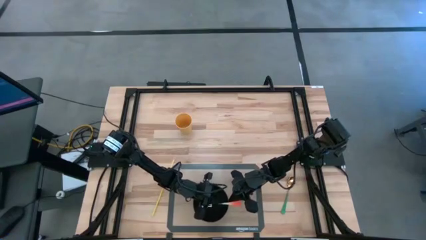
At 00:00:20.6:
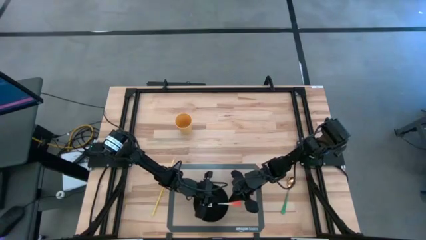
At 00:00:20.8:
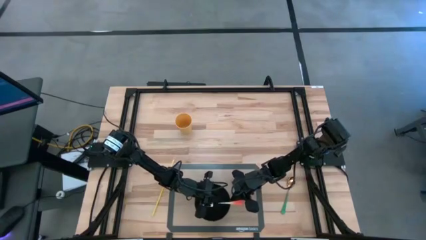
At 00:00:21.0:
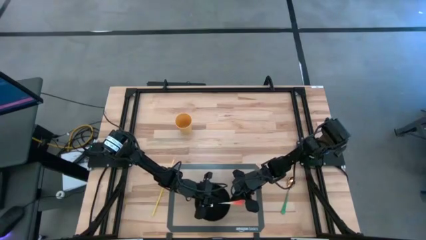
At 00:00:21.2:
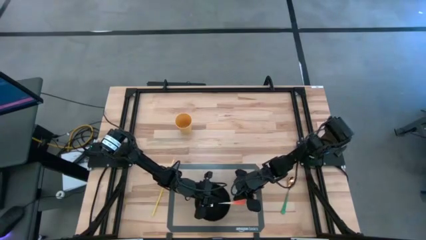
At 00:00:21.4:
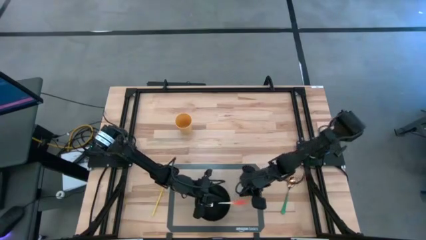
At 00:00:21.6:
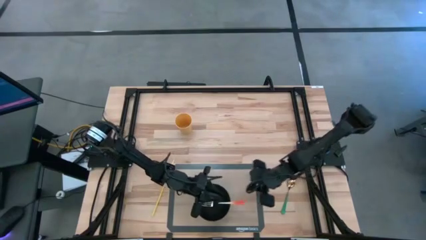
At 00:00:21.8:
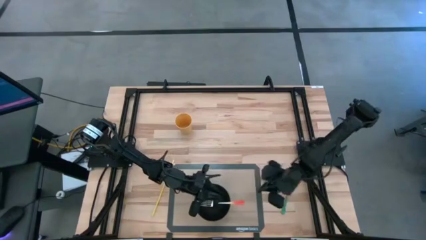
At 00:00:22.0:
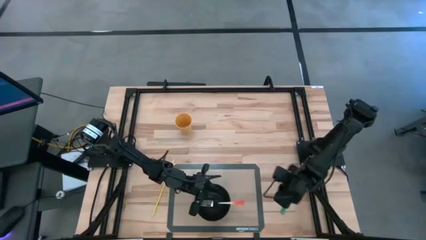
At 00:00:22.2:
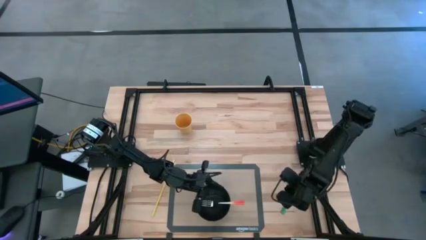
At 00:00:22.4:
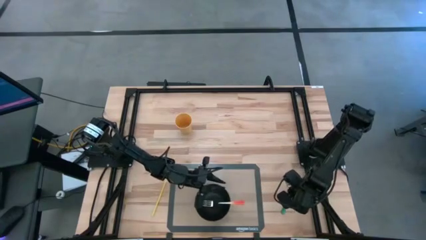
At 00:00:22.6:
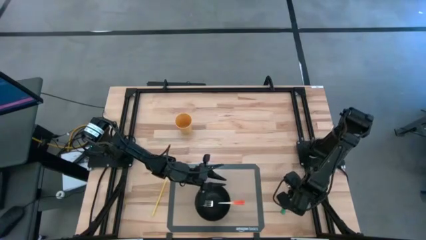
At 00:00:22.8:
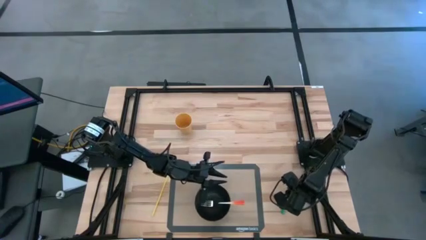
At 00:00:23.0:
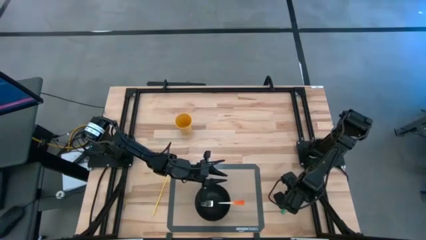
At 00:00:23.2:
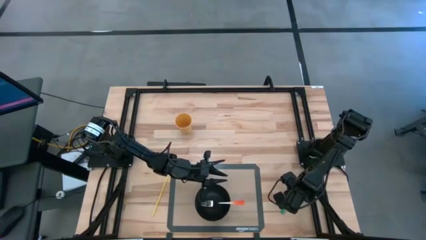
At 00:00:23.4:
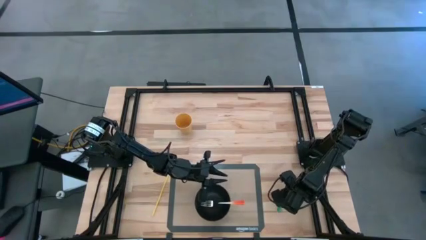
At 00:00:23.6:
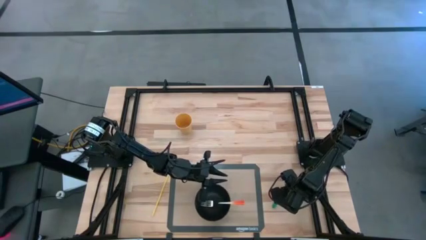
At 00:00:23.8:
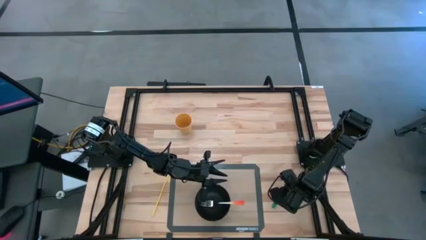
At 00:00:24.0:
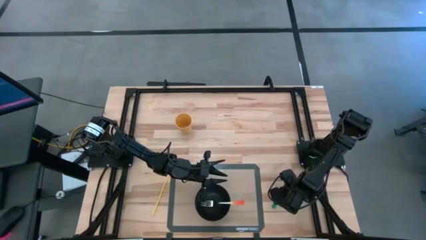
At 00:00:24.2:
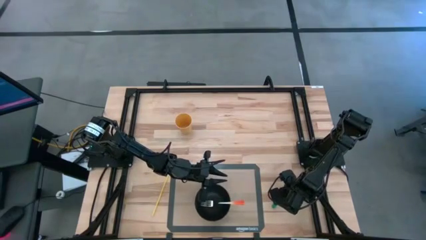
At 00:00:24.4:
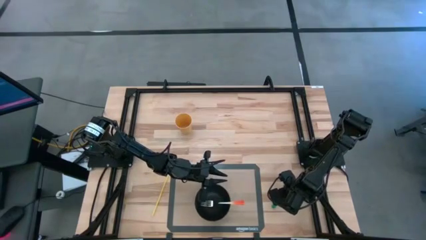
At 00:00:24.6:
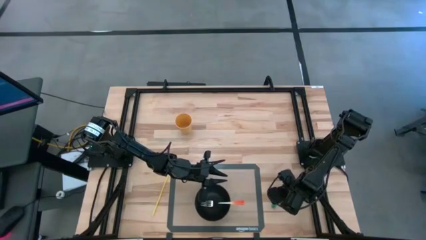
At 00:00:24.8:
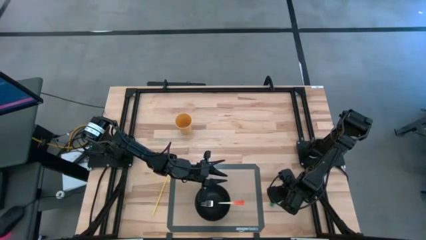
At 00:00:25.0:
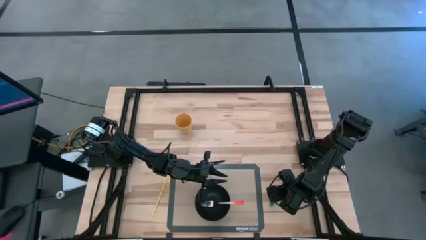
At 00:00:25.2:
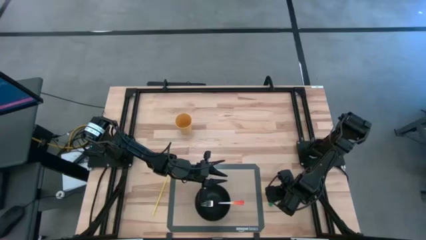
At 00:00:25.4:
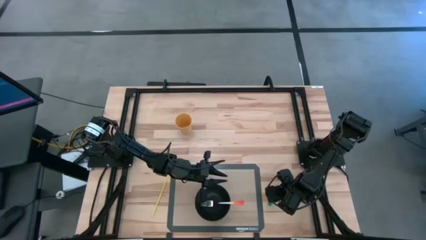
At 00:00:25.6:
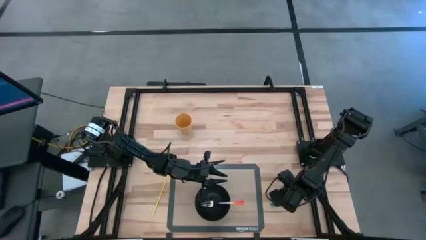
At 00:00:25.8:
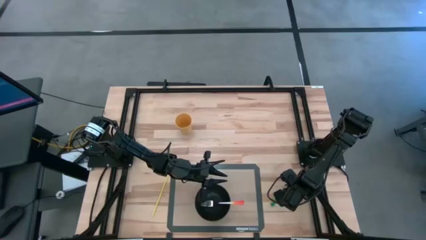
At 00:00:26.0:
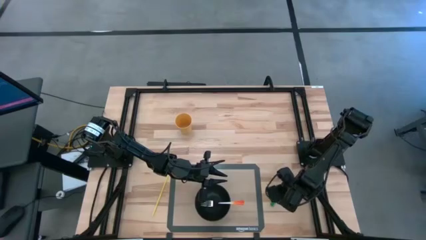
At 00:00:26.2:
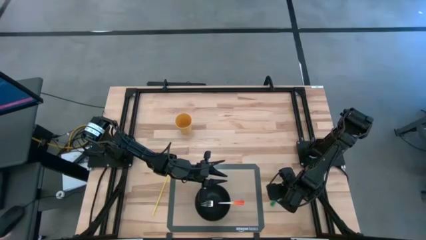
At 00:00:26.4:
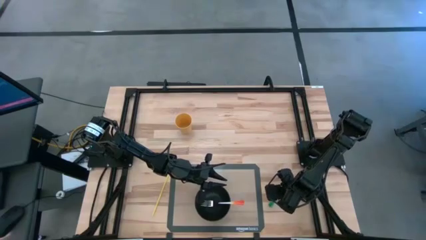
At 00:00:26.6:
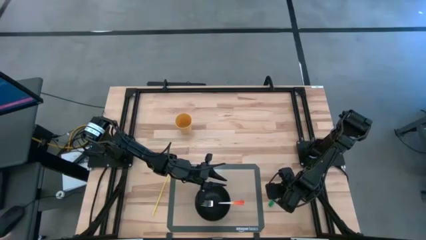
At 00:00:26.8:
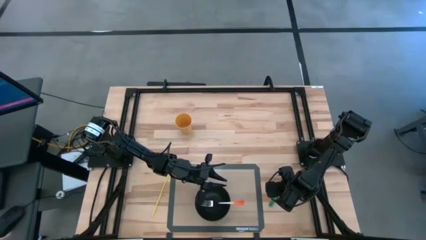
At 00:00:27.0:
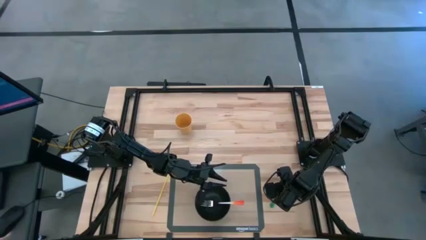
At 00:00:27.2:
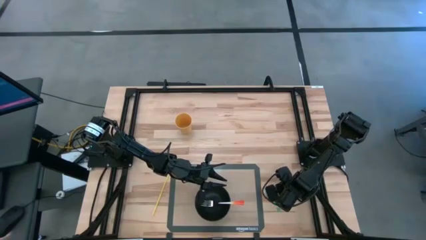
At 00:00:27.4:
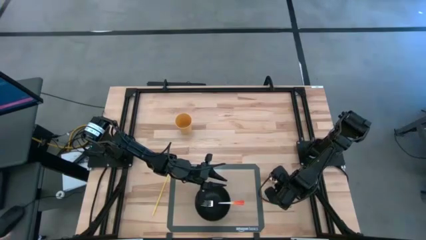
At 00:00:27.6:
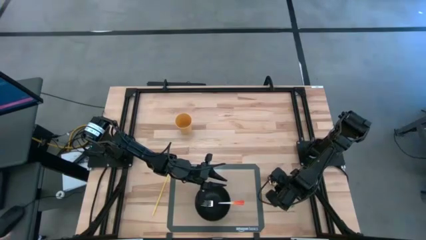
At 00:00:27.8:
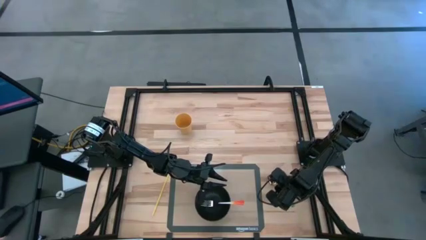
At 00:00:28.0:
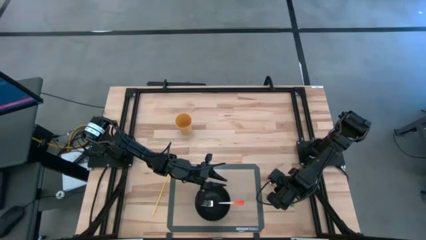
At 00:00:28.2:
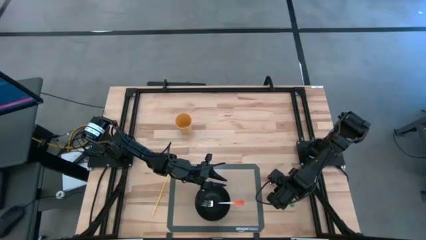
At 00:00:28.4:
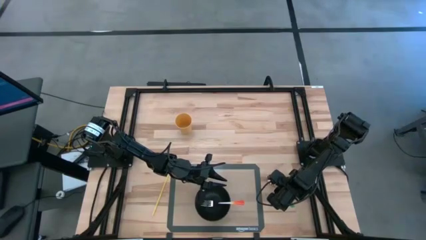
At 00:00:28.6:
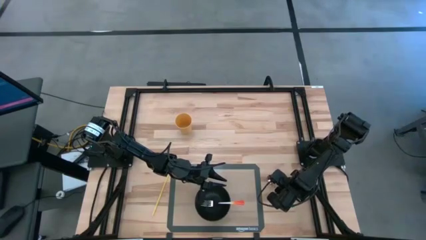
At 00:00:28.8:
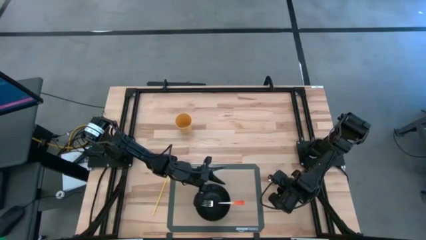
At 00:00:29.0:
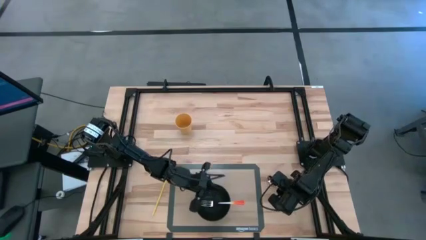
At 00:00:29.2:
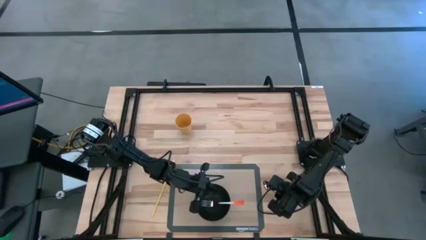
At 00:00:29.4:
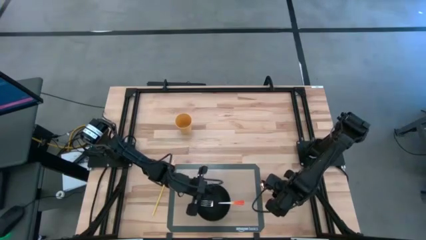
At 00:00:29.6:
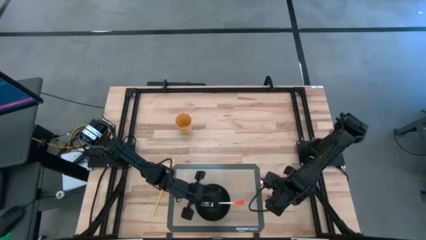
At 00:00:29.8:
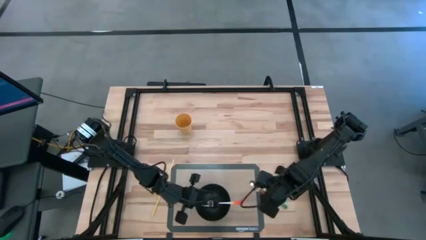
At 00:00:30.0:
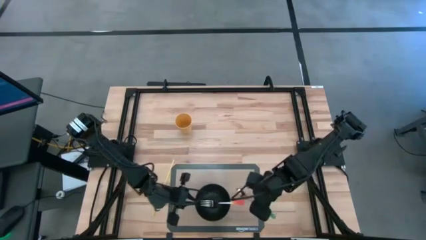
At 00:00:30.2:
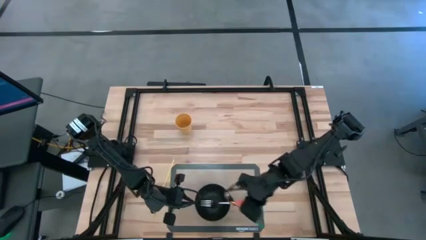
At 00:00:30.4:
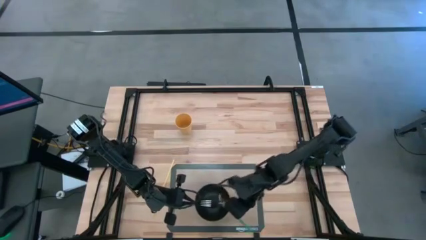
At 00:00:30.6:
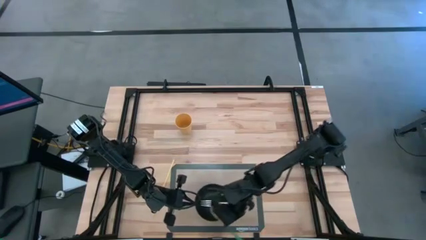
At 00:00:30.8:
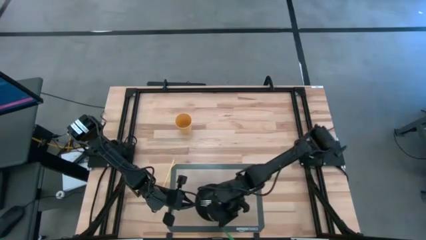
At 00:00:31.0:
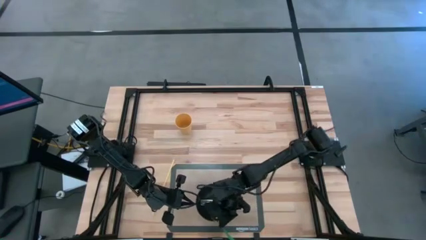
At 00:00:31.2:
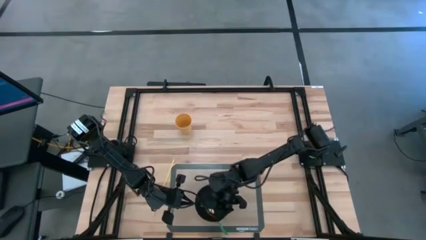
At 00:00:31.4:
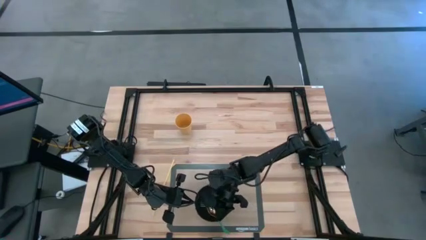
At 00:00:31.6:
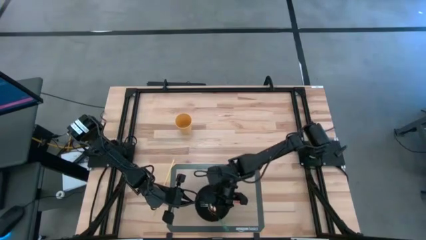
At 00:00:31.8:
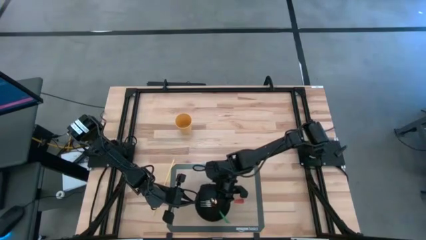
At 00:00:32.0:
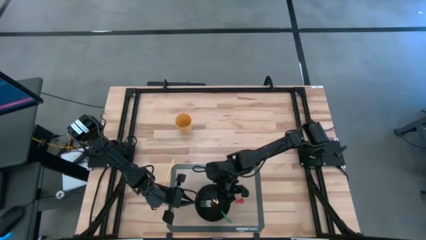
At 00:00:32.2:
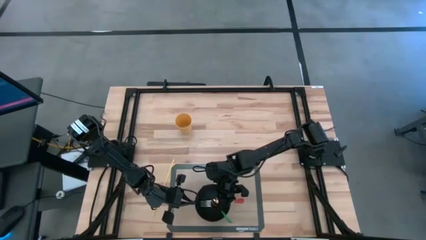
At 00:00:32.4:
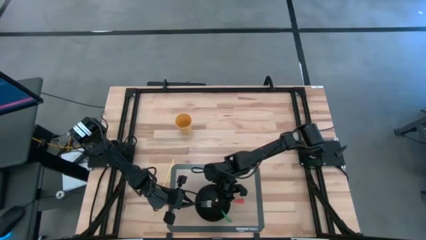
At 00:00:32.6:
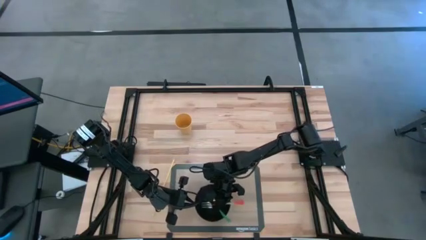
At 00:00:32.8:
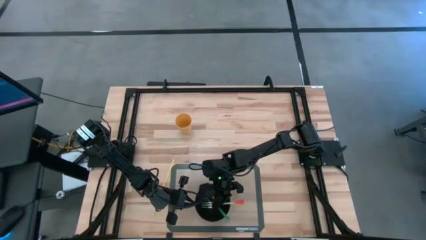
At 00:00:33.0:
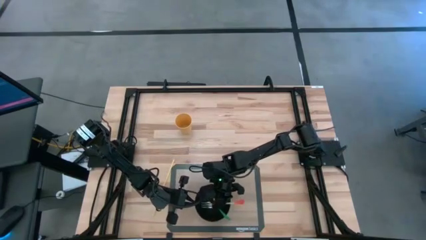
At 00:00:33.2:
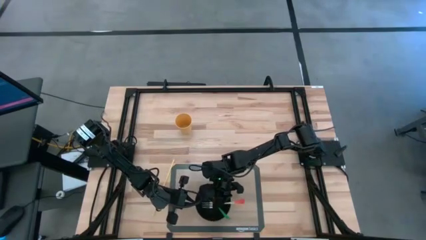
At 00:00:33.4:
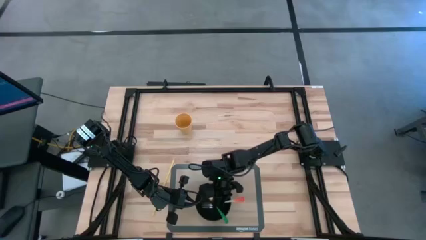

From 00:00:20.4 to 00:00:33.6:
Task: Pick & Place Utensil
Put the green spoon into the black bowl on the transparent mat
